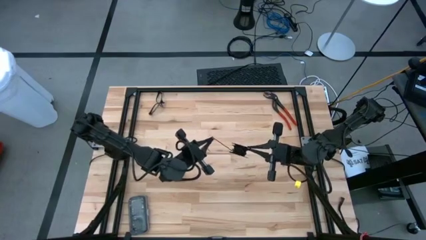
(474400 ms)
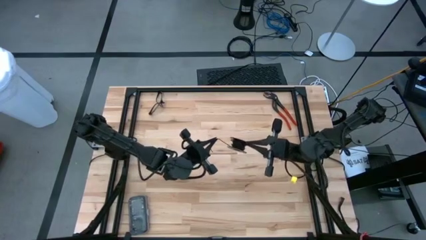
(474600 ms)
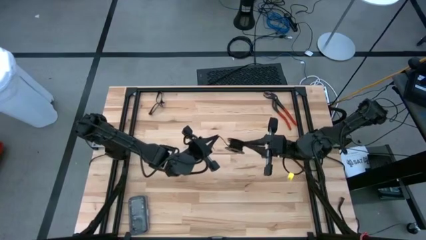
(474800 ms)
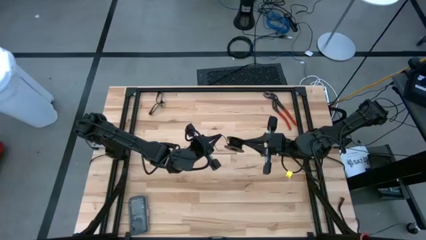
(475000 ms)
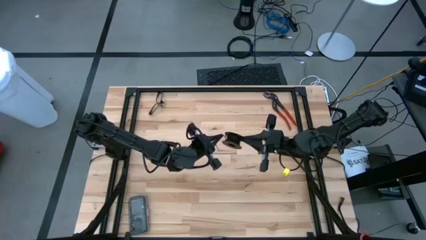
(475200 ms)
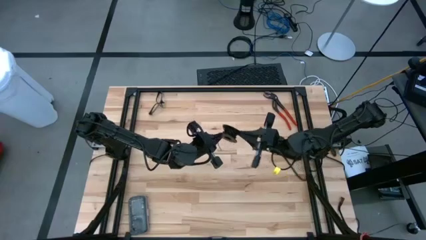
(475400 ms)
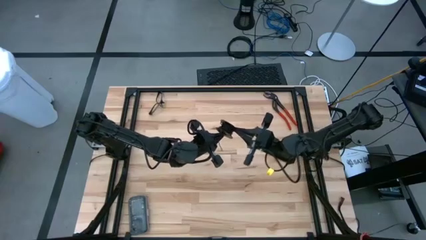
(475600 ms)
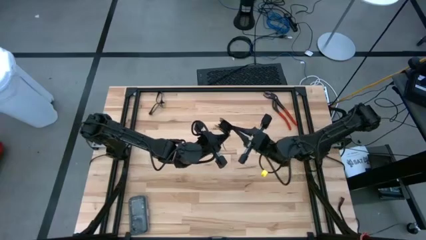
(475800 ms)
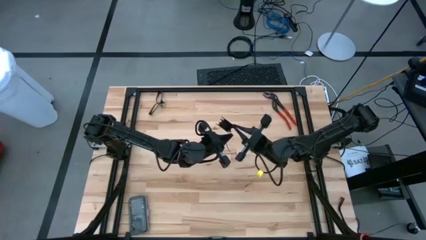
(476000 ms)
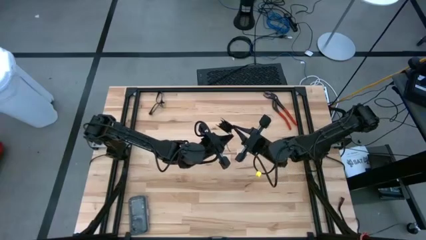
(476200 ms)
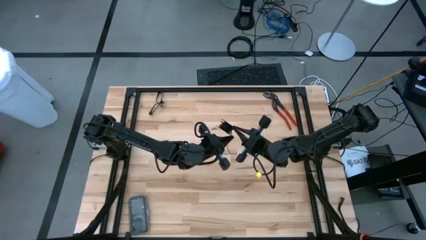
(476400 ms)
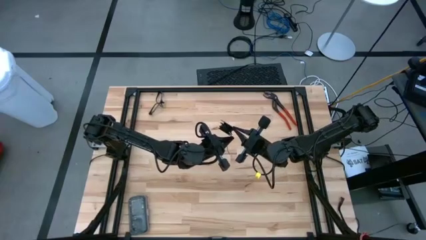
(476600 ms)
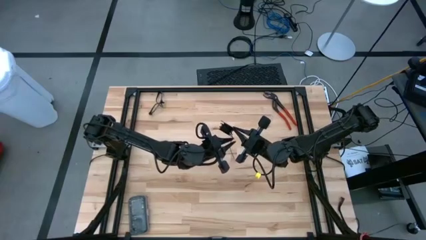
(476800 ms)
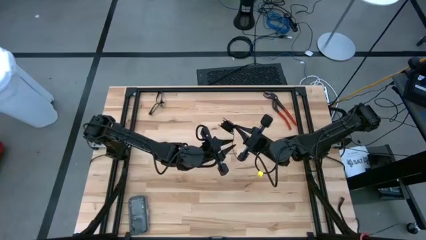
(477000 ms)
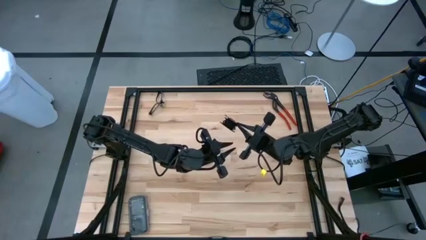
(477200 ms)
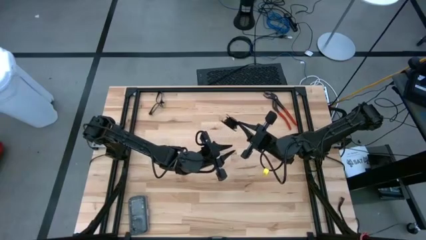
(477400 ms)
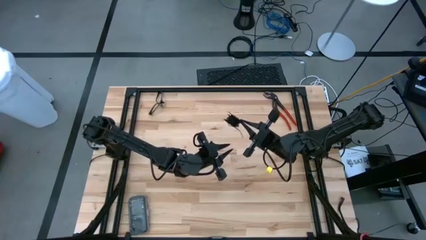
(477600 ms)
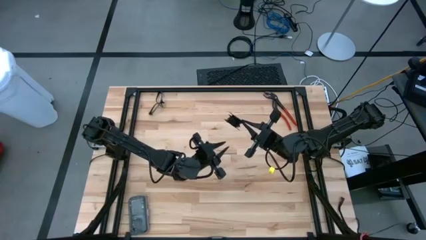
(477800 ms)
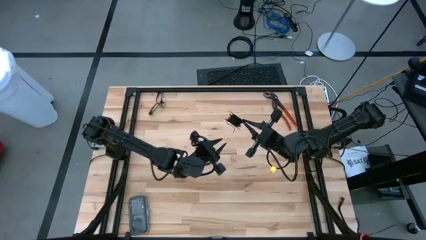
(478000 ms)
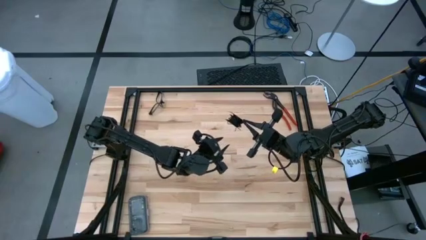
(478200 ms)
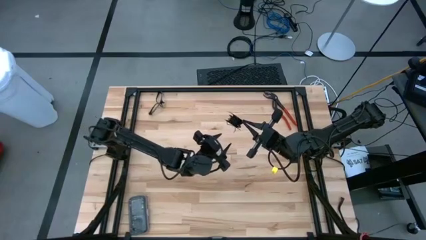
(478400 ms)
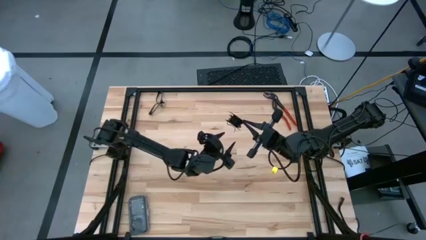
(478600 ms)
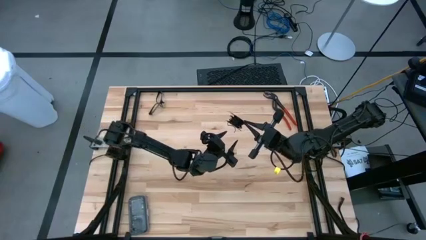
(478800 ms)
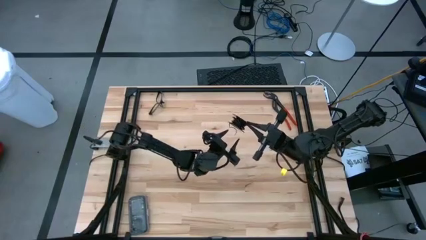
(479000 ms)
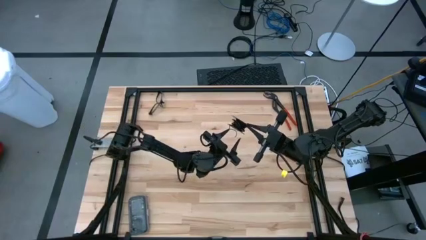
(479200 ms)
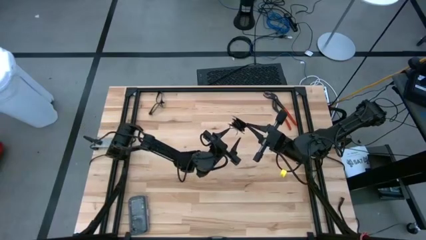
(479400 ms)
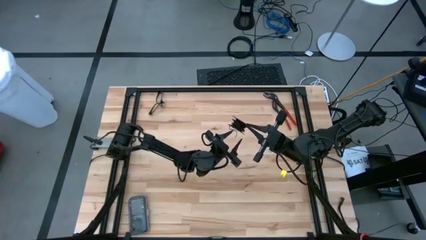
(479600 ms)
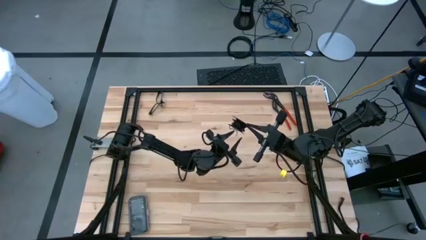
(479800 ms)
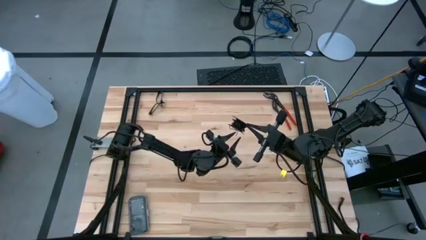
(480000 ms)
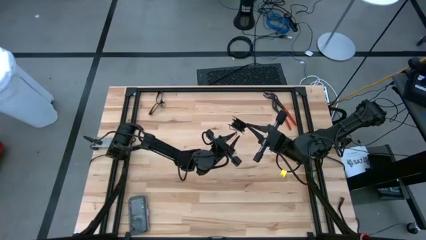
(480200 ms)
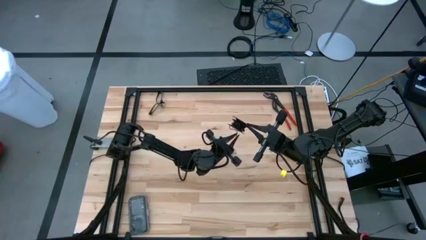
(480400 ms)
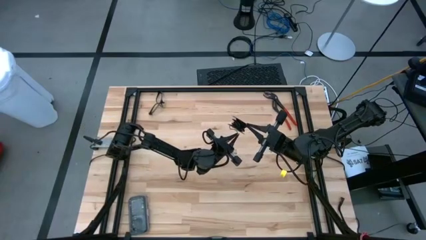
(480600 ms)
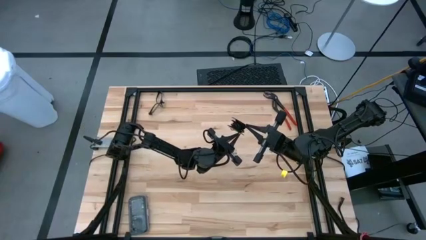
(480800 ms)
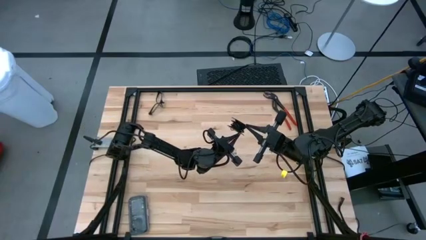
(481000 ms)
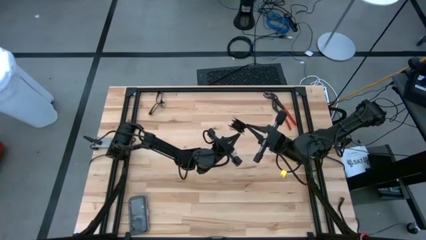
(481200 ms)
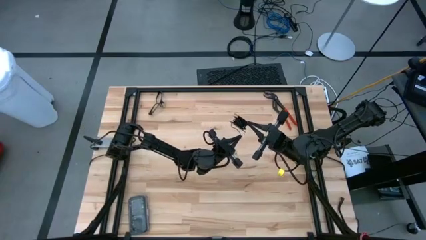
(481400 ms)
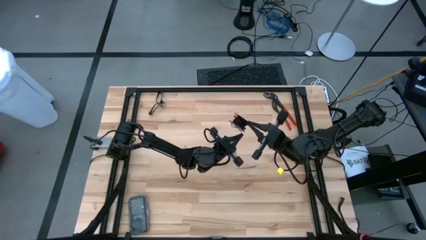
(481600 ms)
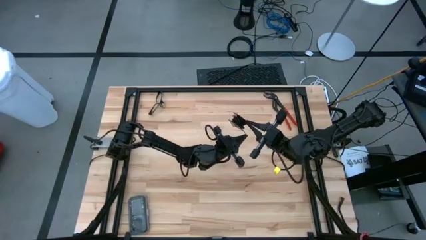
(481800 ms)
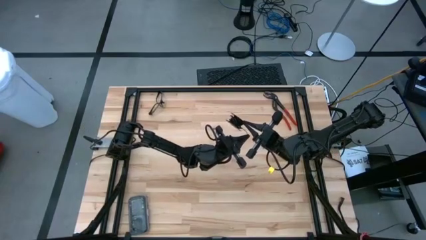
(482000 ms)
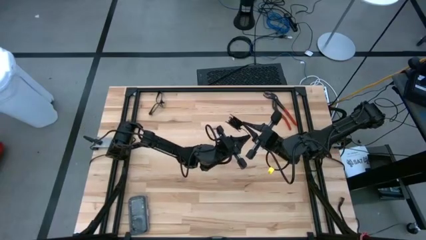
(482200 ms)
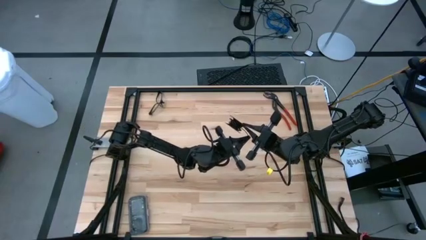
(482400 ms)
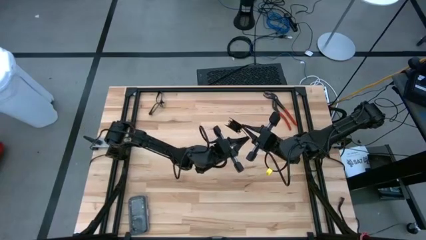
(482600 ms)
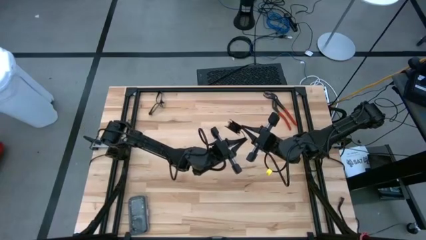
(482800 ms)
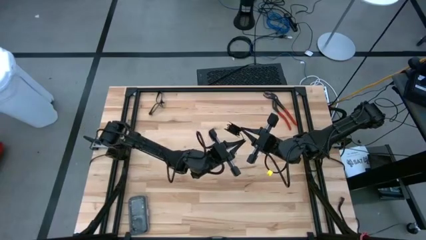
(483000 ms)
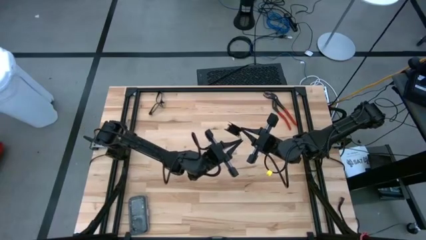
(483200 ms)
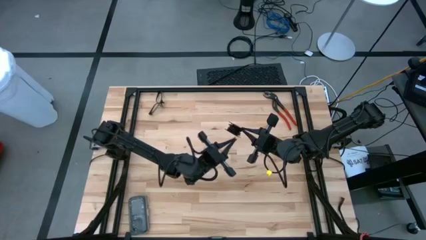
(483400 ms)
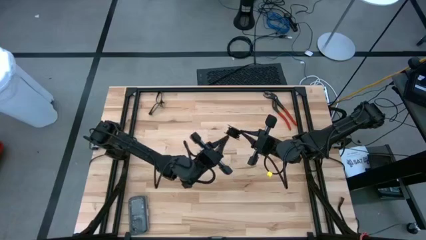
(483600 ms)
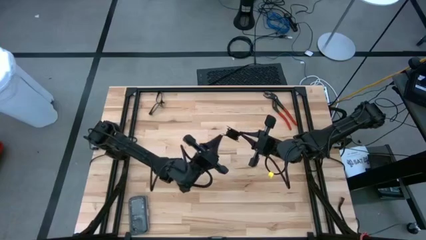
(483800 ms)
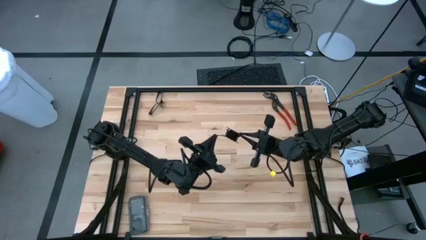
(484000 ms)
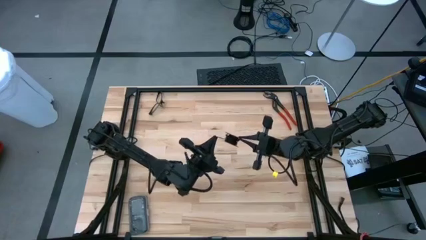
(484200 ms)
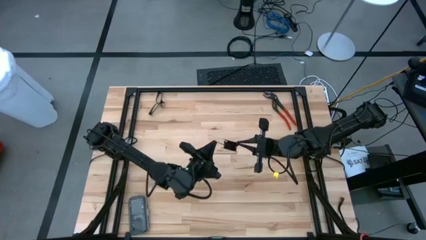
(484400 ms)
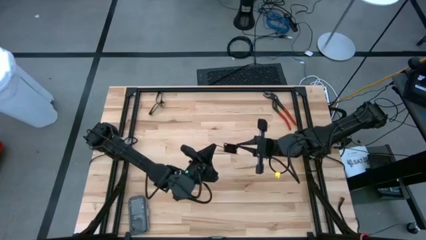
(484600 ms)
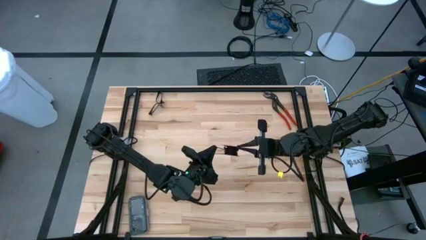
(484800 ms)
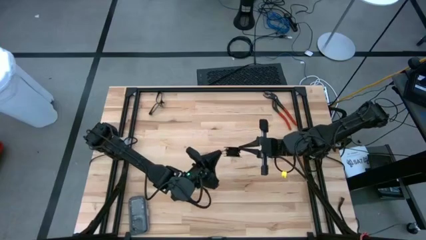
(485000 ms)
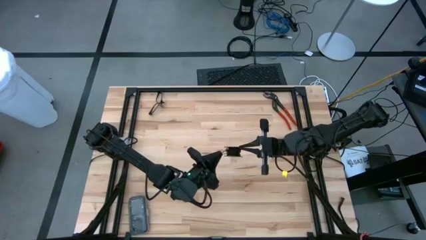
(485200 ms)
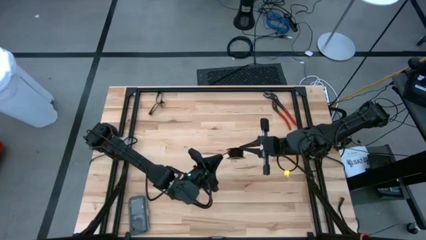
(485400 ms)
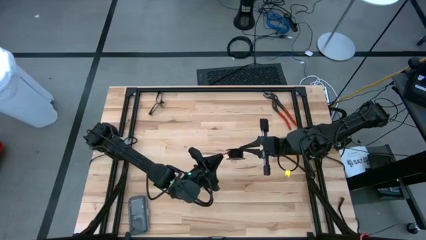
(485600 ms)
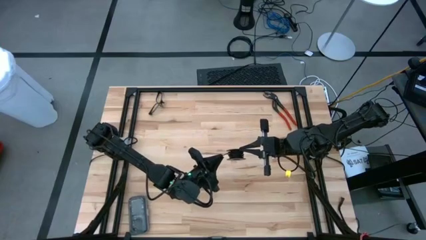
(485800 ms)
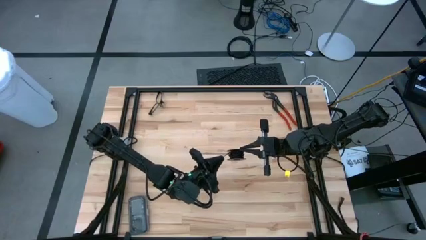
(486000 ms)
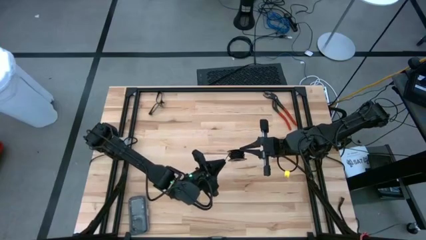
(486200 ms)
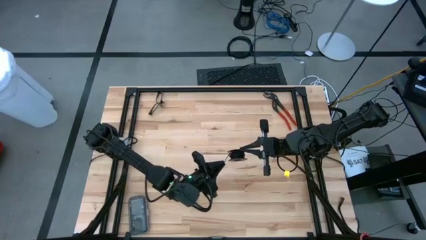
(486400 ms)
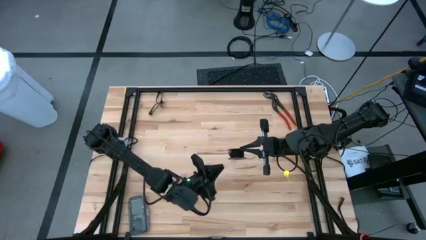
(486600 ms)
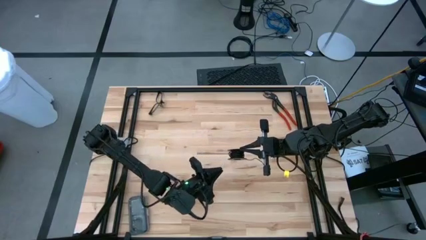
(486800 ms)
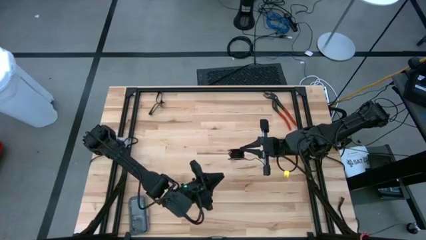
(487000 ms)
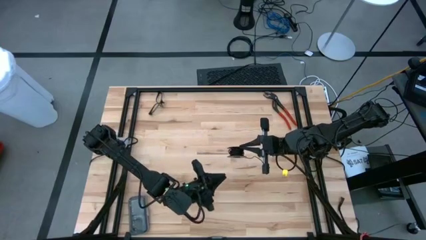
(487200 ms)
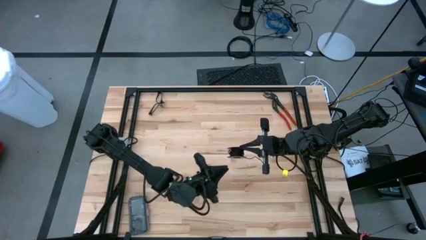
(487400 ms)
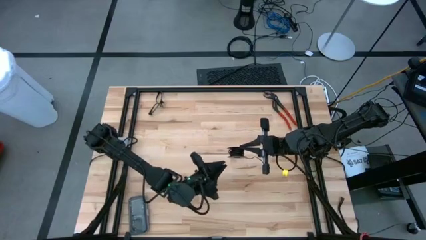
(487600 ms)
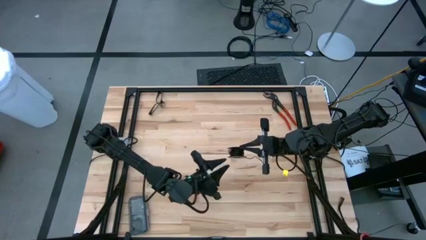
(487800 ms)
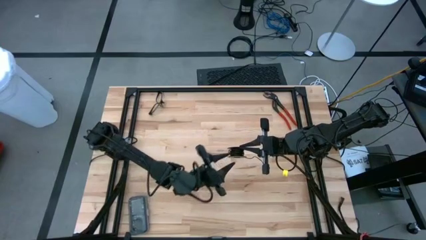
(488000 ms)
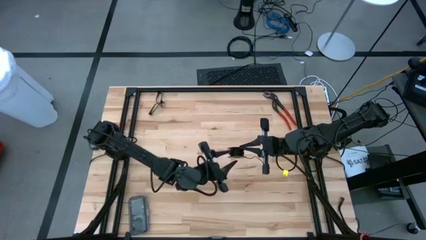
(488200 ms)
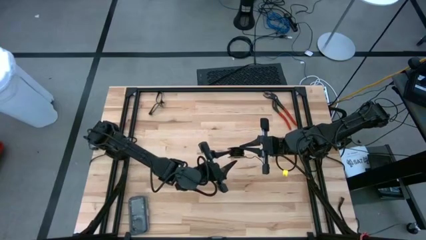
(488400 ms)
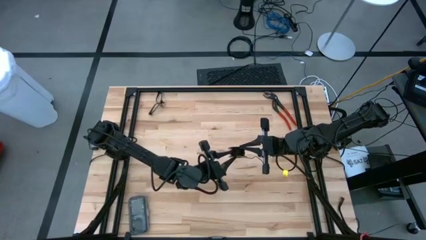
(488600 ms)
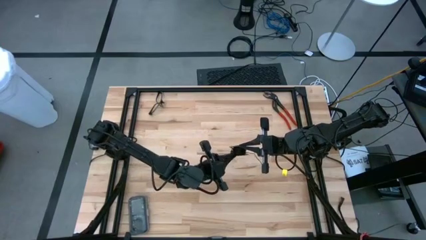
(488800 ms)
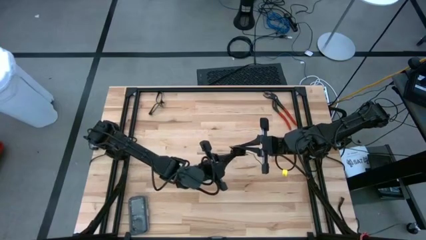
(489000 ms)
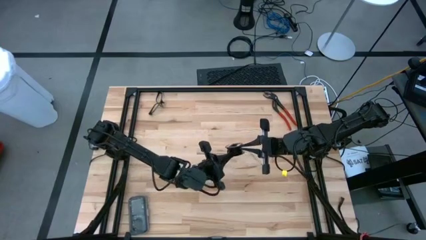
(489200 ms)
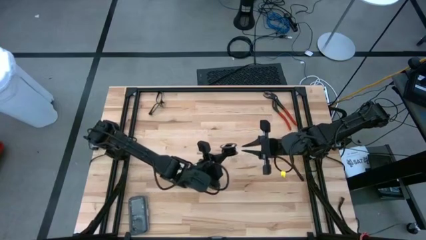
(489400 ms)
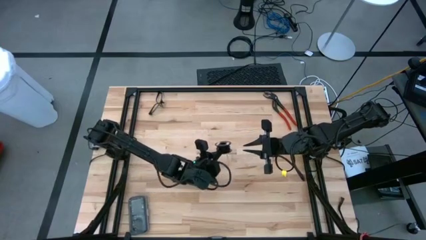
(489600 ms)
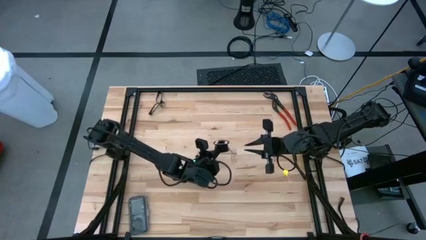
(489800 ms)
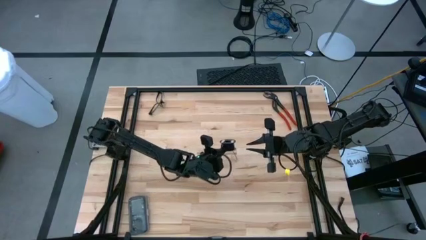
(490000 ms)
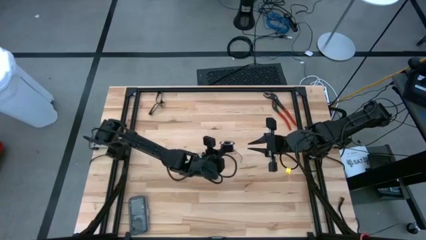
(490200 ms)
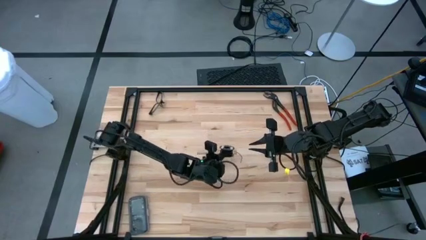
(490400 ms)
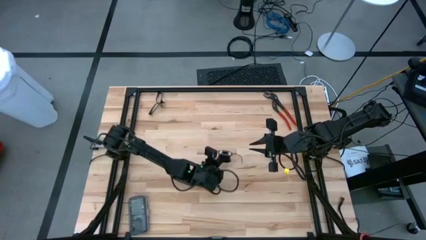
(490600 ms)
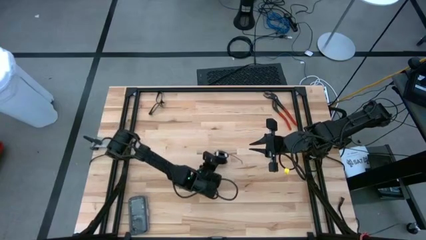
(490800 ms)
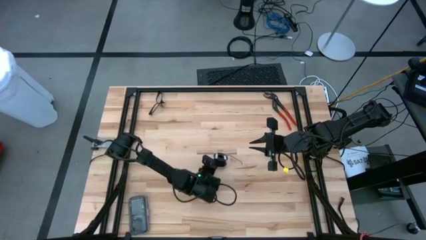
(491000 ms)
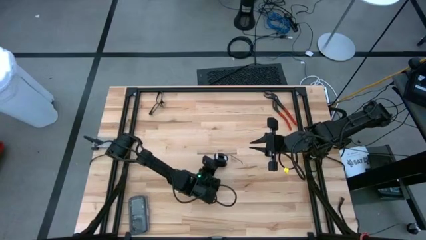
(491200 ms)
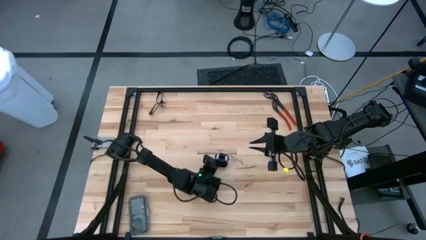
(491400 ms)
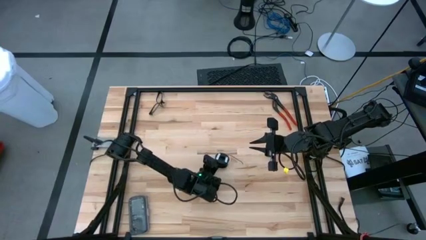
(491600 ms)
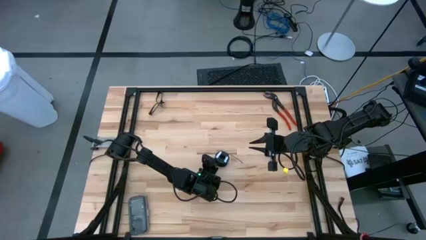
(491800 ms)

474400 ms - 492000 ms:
Task: Coil cords
Coil the black wire onto the spool
